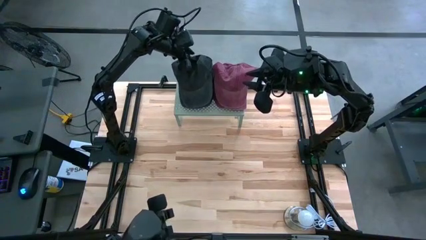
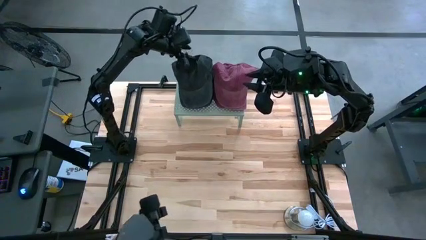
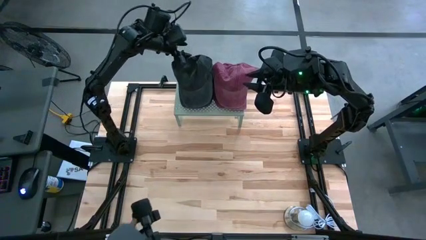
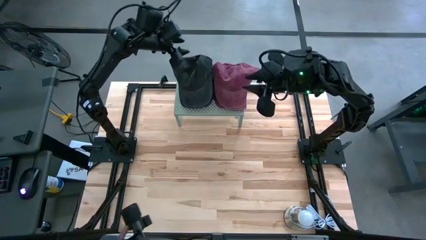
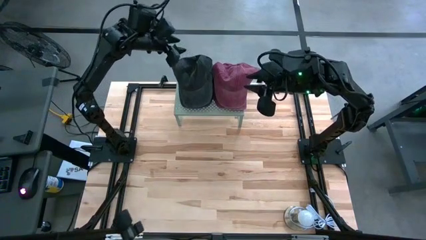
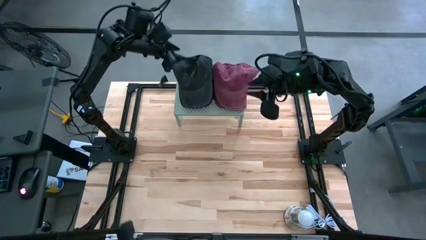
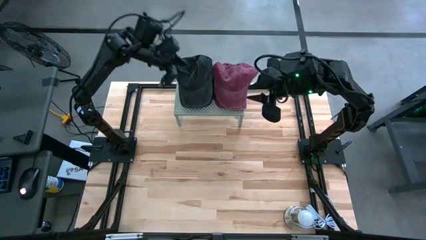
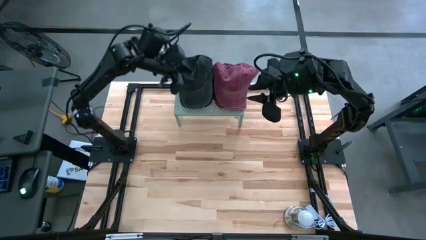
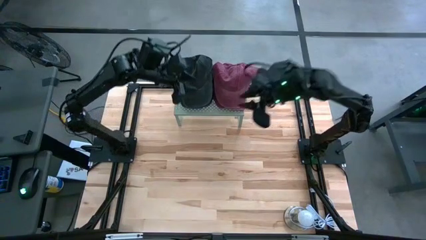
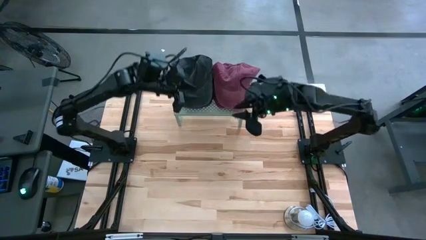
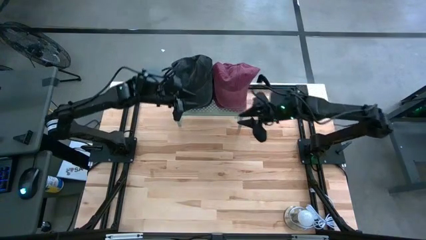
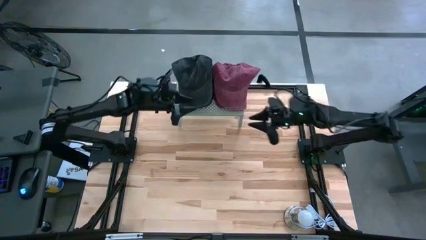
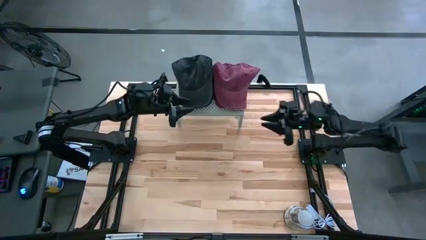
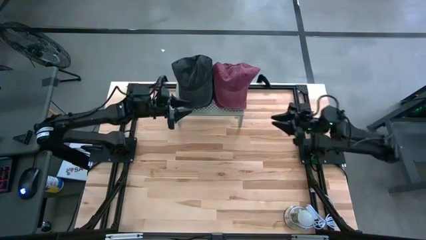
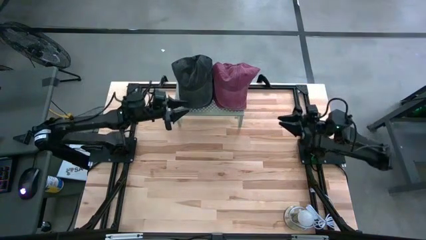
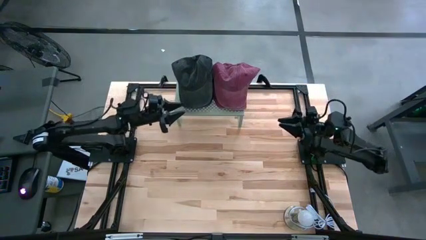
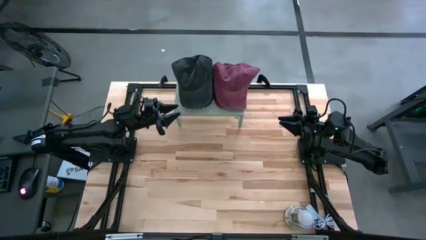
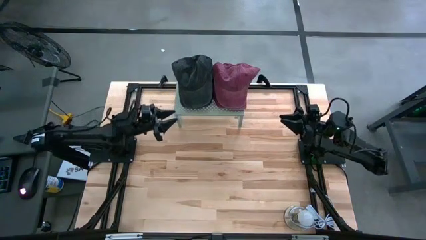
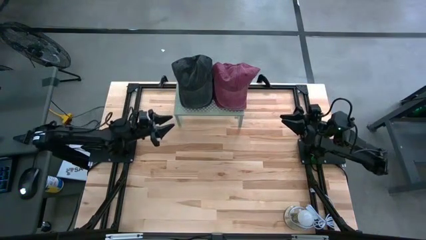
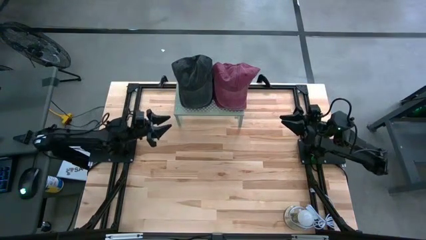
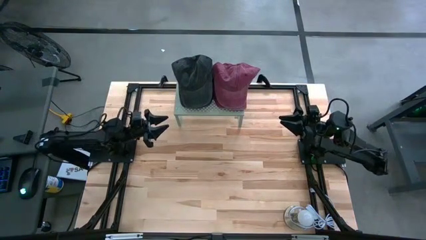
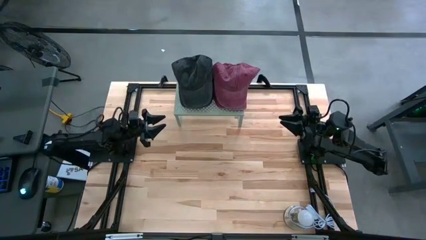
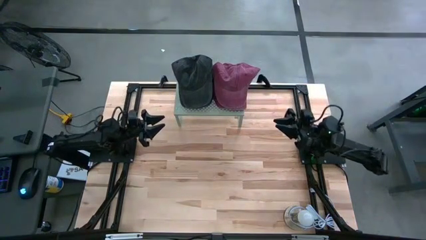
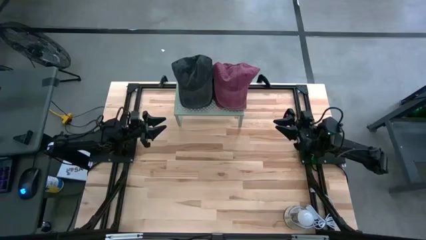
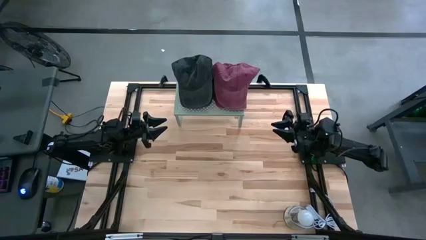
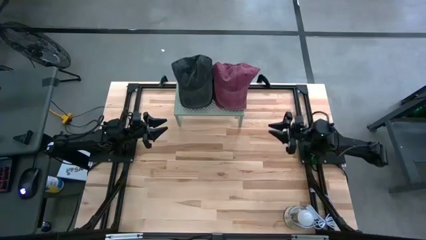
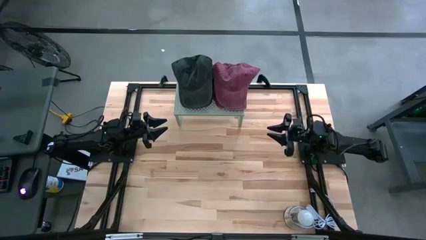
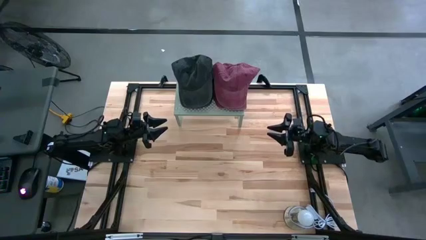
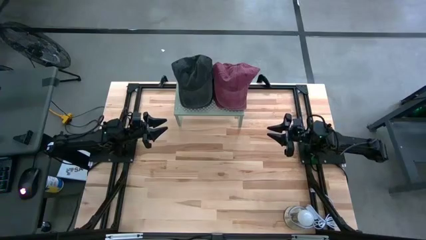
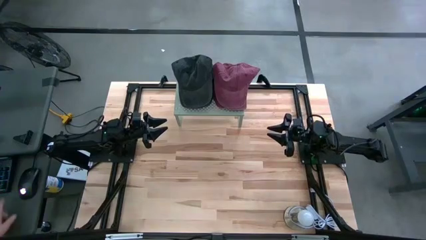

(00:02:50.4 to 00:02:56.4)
Task: Pick & Place hat
Return to Home Position

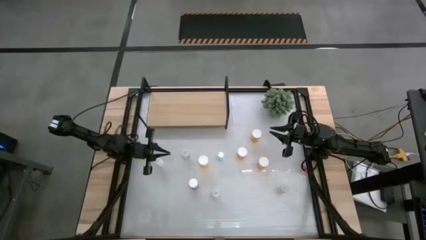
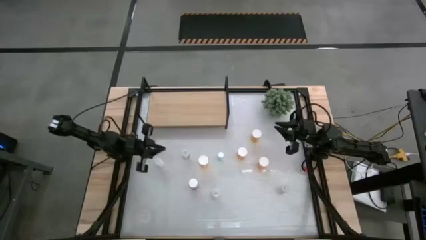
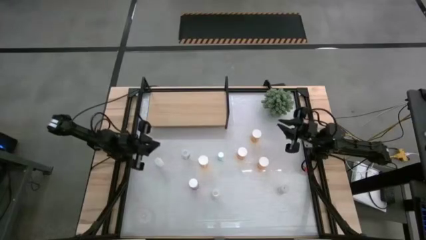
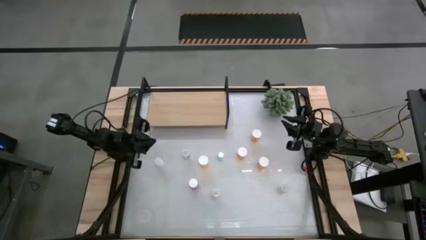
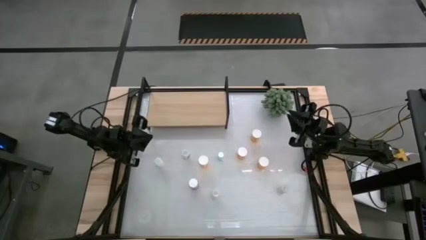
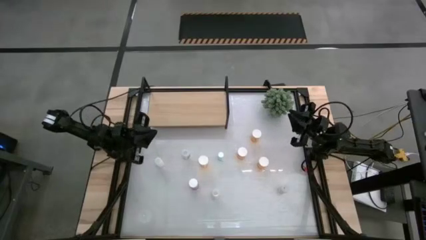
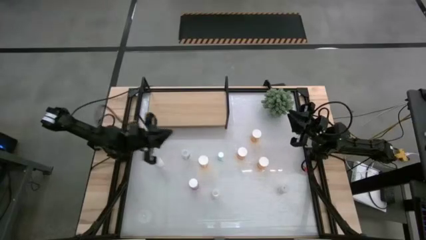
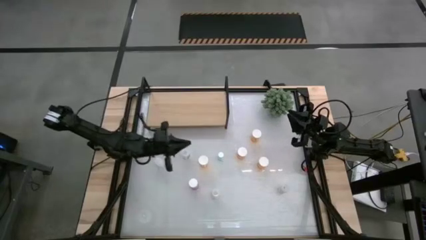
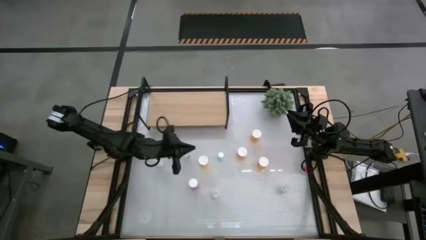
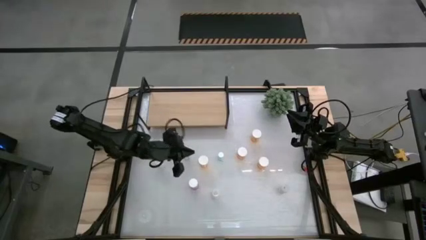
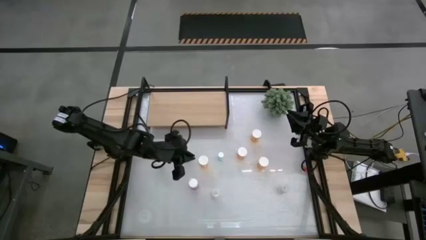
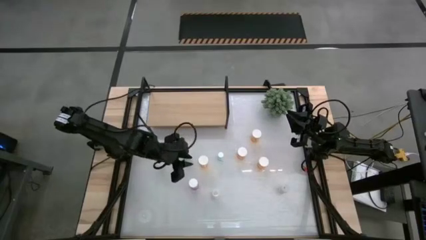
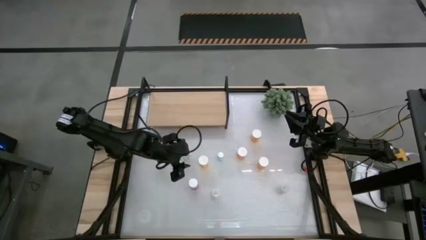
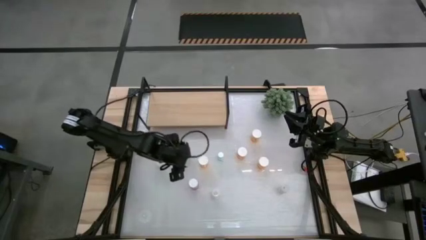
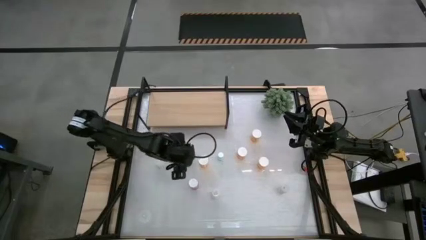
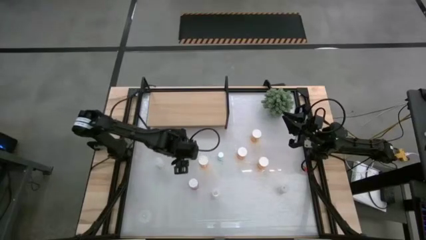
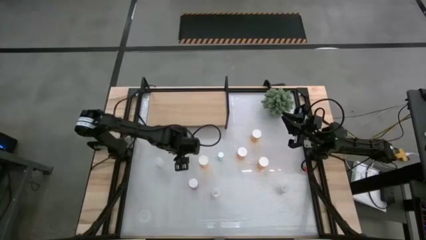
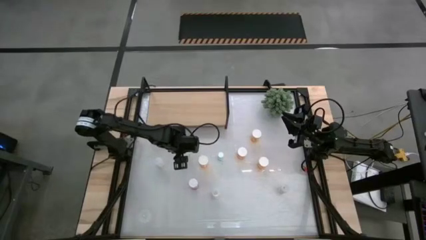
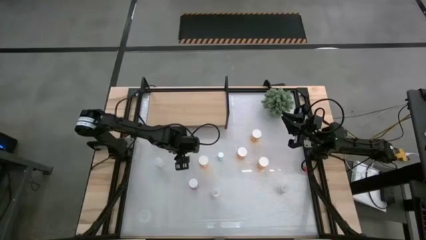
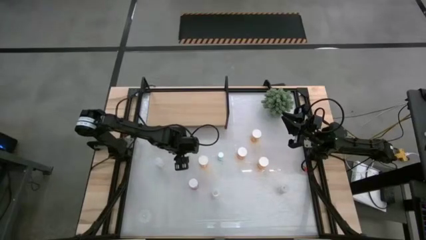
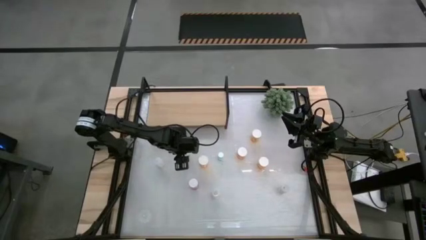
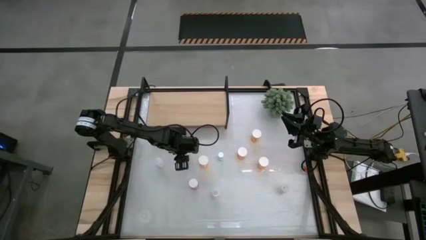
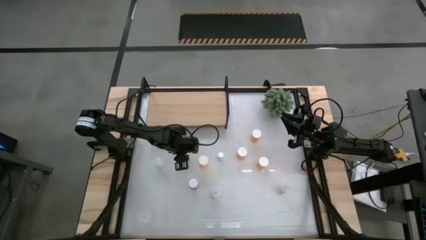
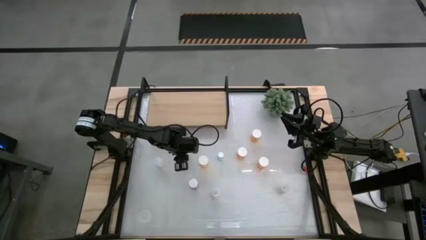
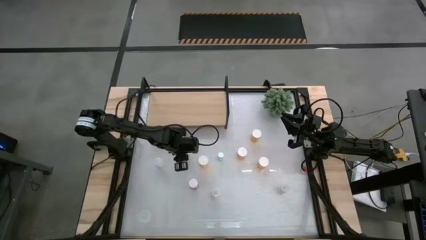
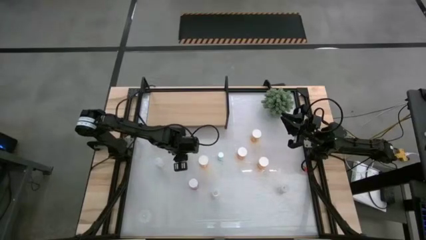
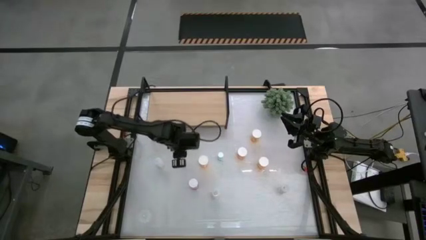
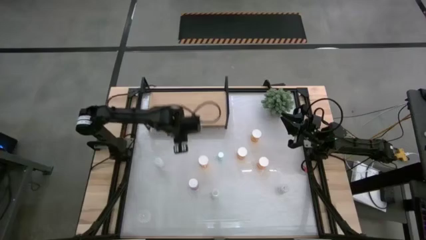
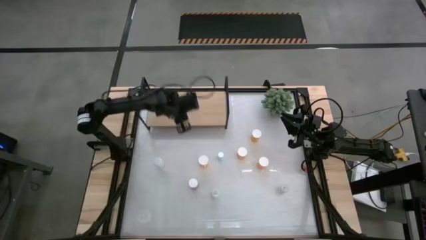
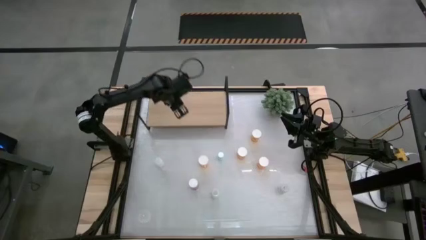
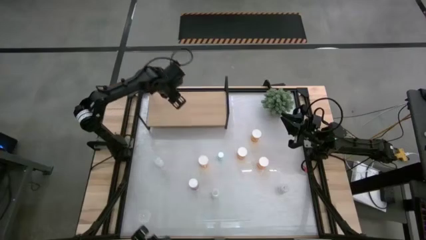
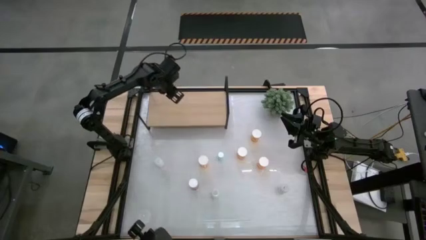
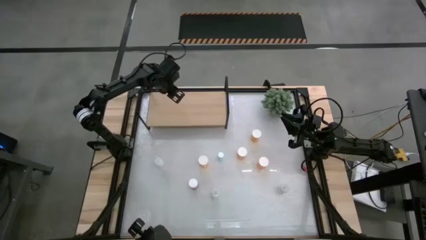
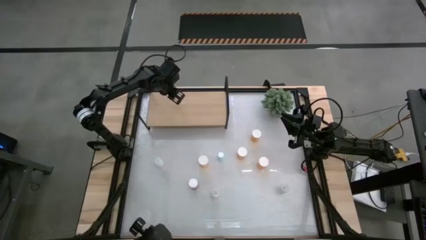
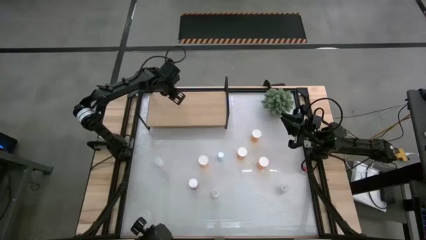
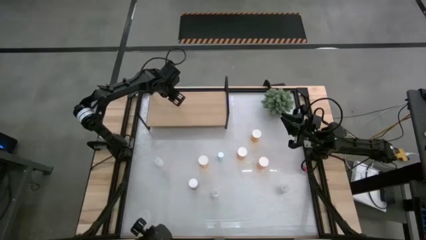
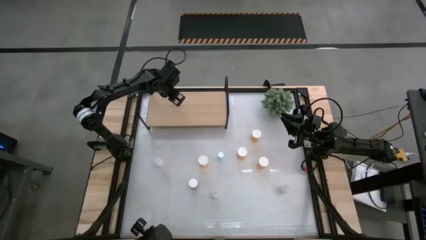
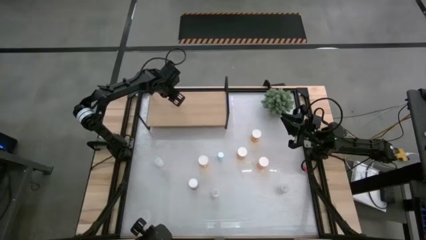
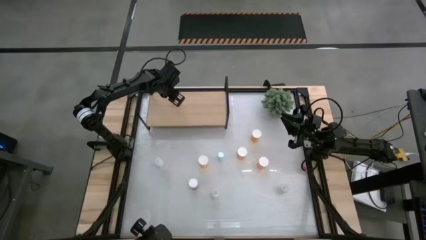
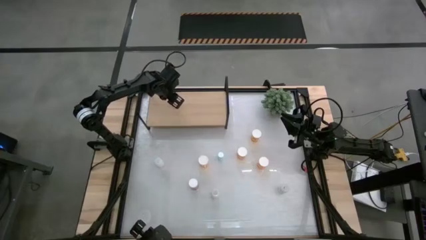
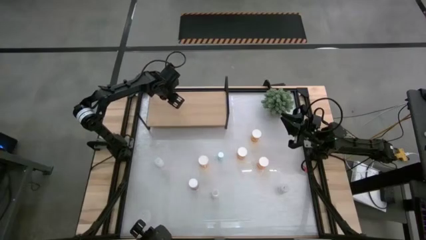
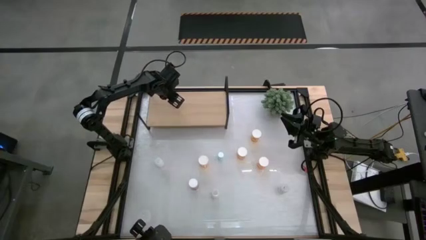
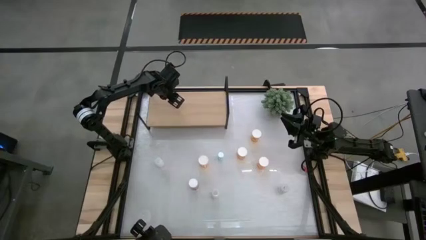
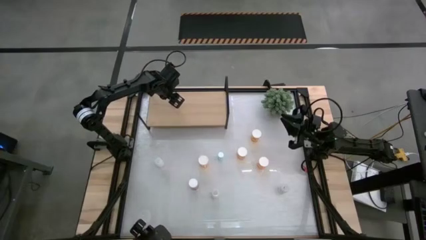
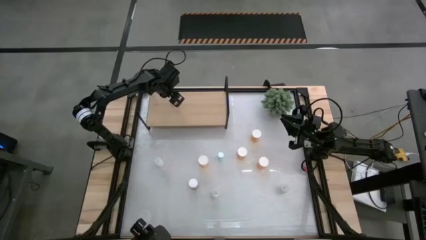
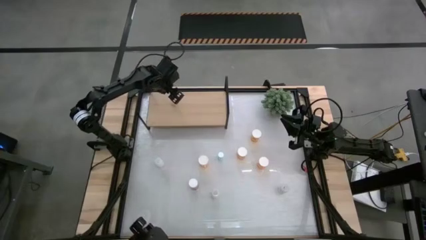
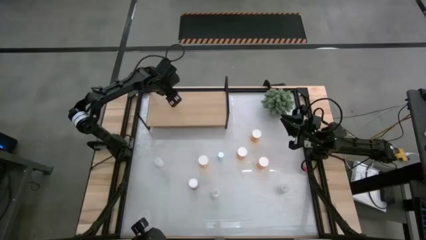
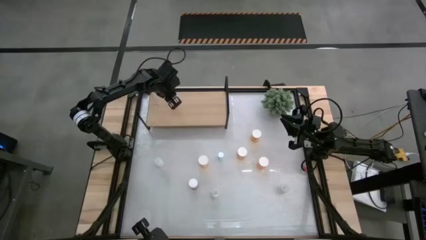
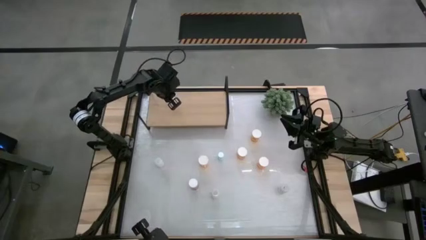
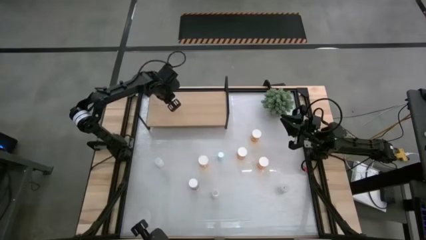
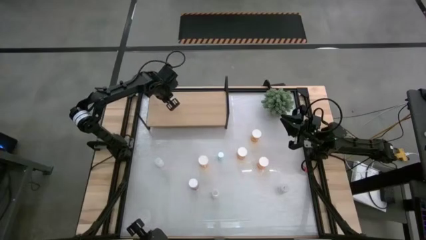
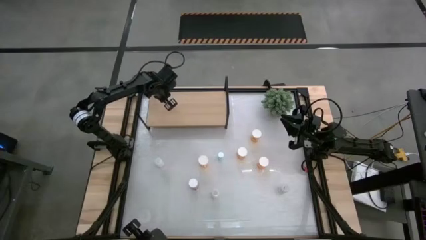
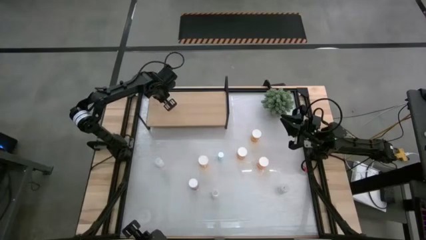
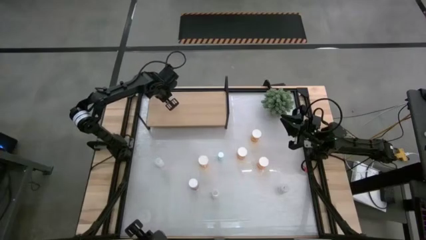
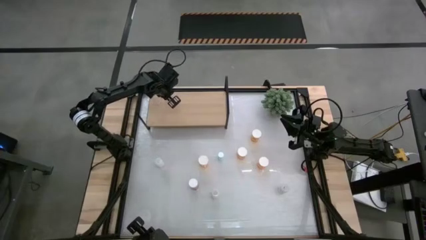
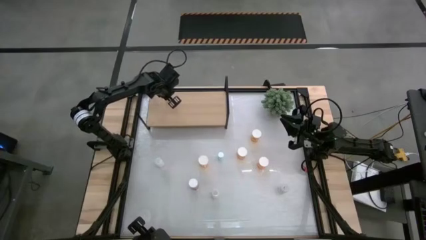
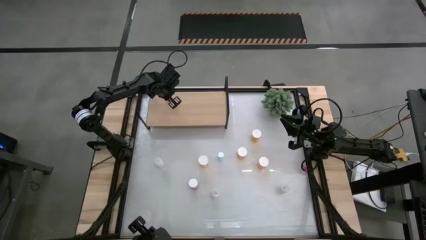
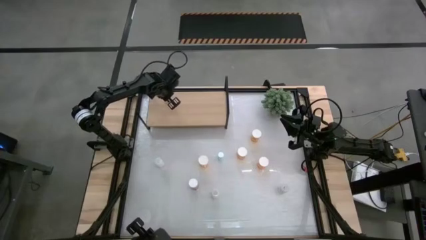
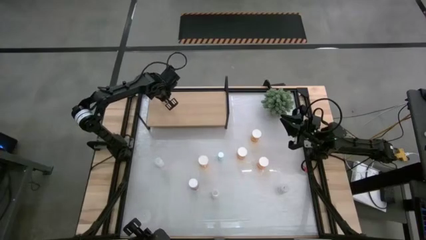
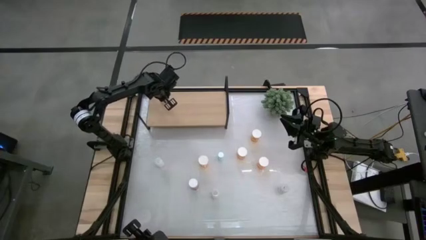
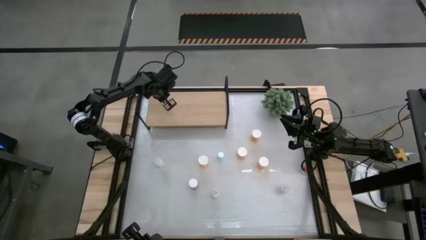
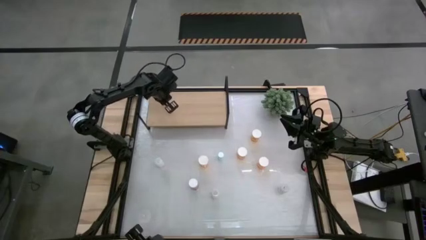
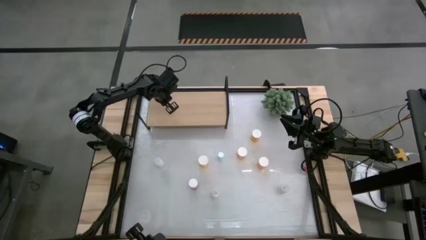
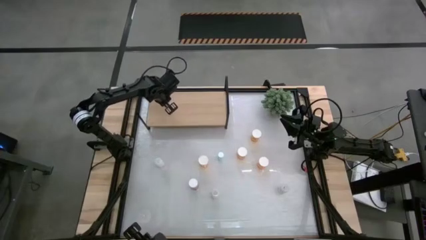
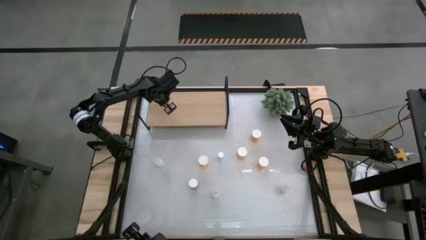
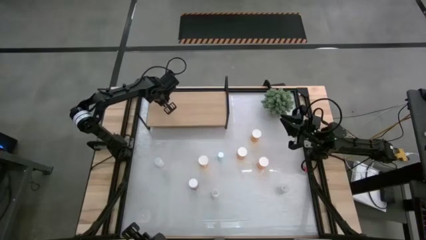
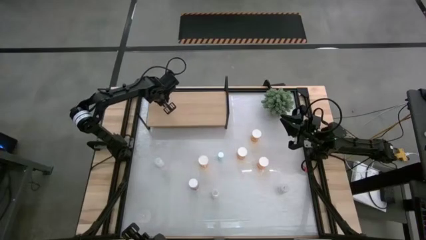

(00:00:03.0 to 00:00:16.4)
Task: Pick and place medicine bottles onto shelf by color
Put the left transparent pill bottle on the shelf
